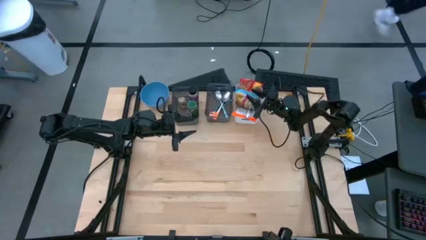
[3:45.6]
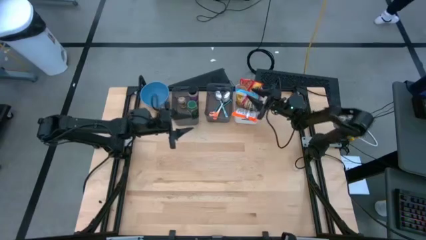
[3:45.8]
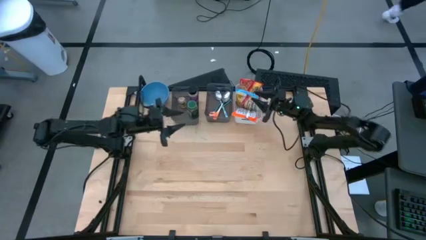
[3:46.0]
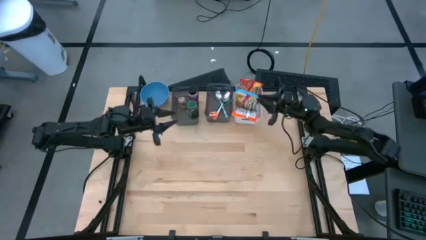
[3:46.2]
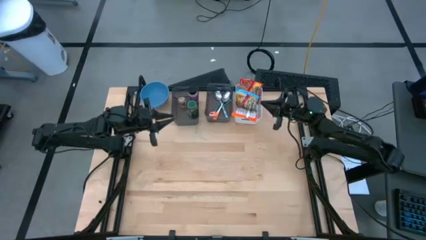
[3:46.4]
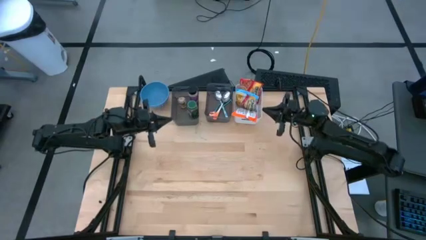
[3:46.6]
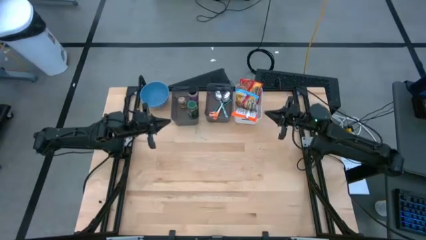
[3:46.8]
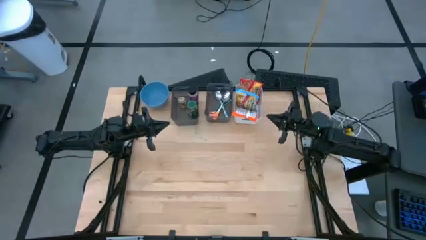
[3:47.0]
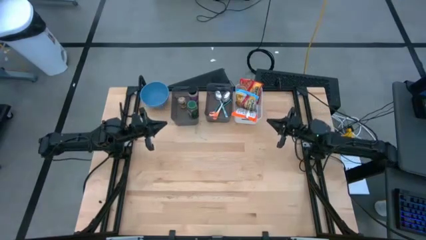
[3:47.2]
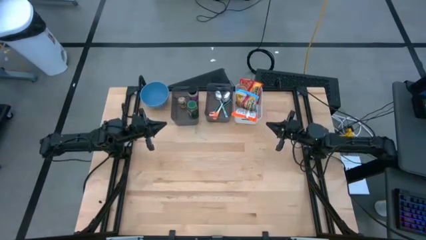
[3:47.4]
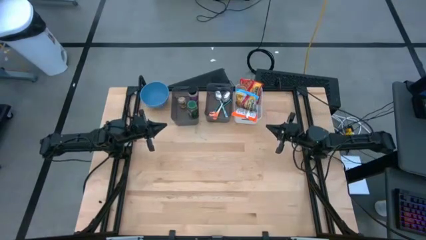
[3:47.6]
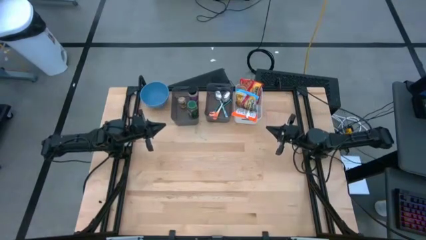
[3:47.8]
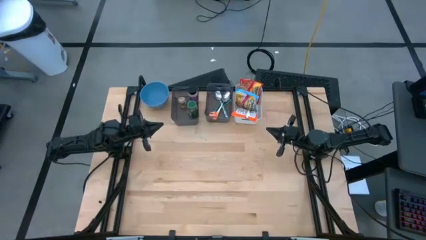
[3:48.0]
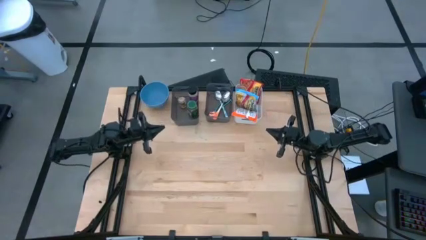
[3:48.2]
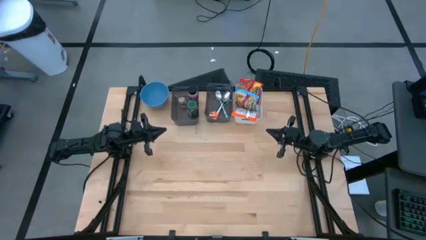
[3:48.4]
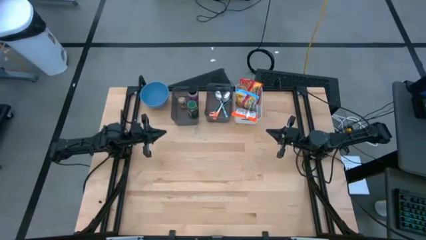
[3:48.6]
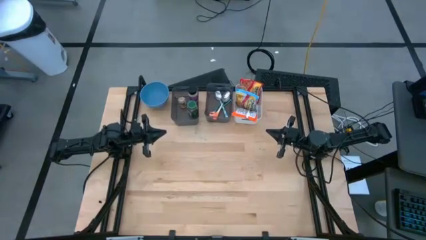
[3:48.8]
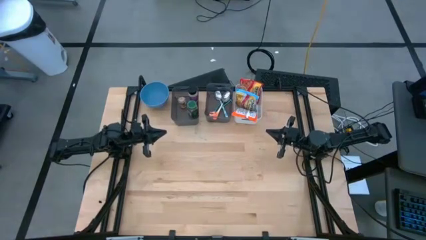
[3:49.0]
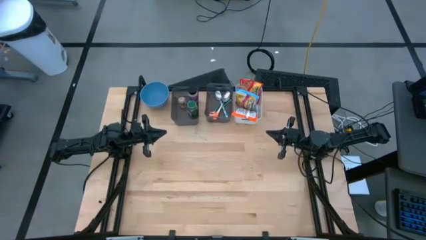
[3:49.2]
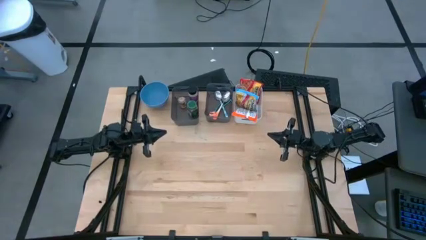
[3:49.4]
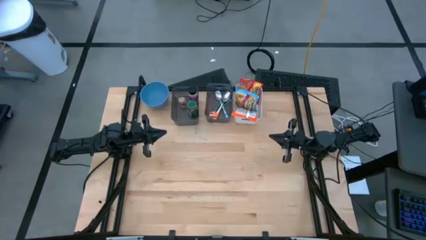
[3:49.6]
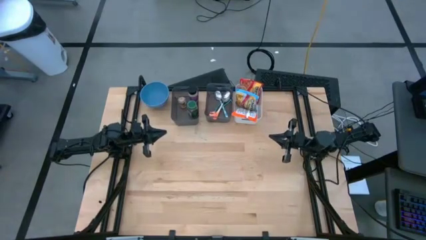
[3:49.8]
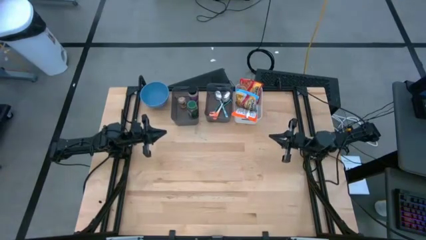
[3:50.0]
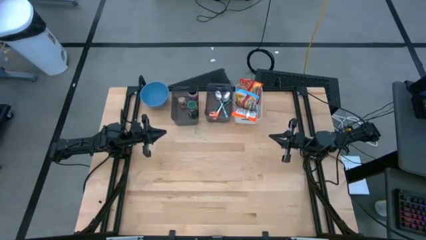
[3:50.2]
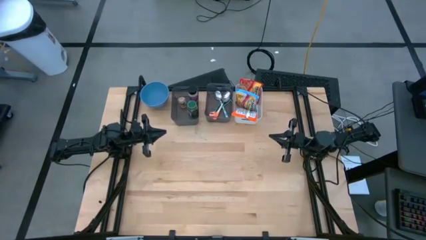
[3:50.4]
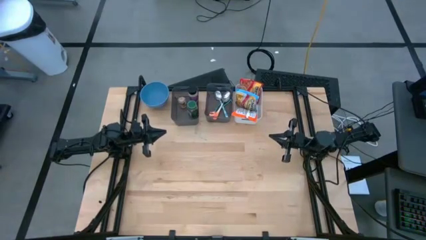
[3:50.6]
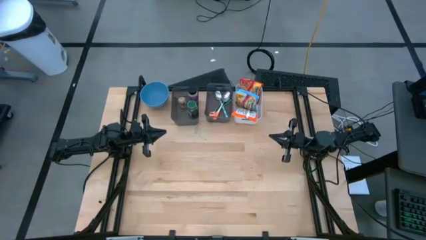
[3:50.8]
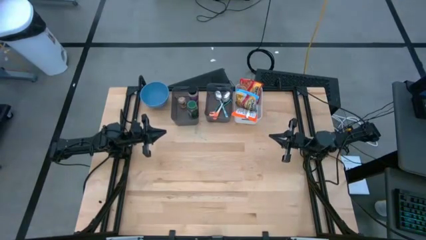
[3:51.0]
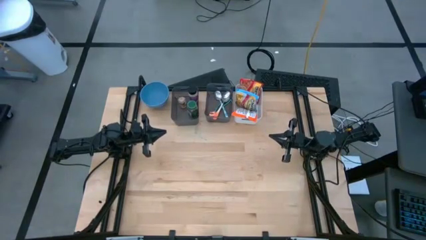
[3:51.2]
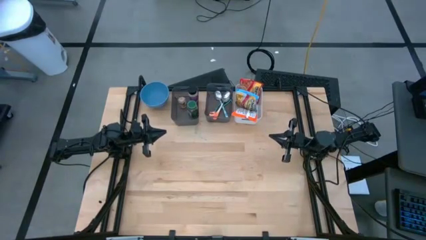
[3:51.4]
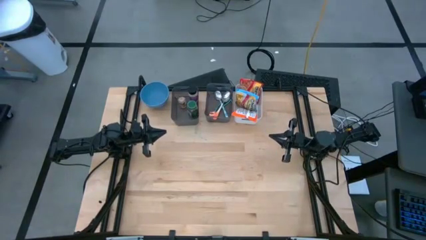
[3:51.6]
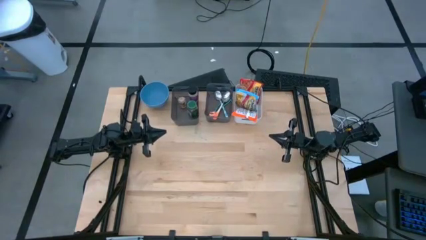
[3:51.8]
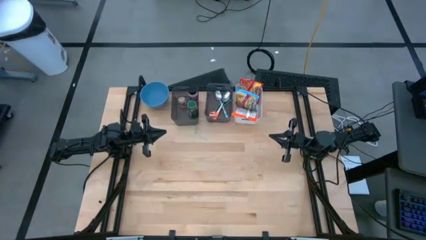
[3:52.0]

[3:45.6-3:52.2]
Task: Pick & Place Food Item
Return to Home Position

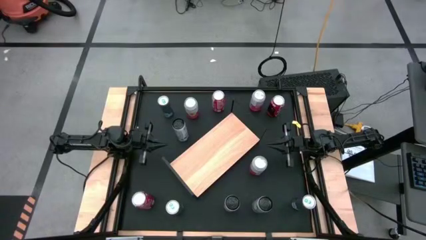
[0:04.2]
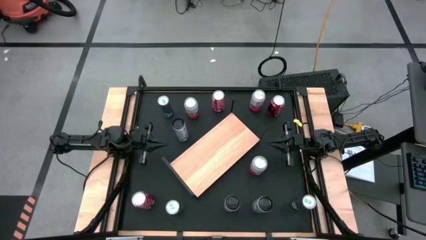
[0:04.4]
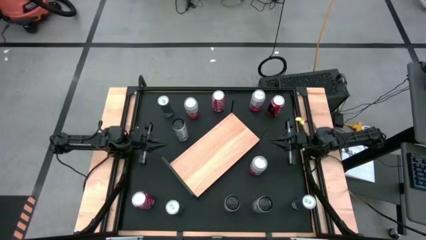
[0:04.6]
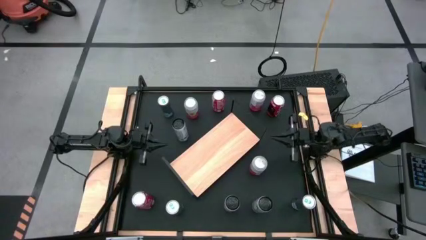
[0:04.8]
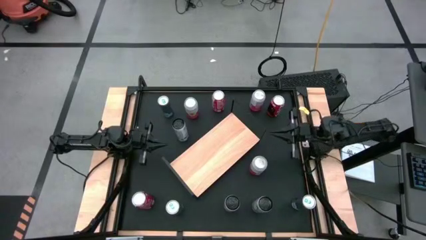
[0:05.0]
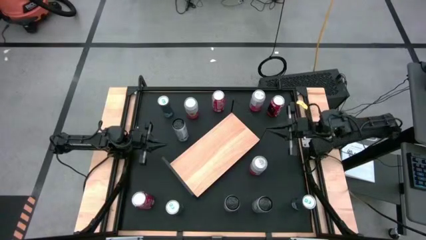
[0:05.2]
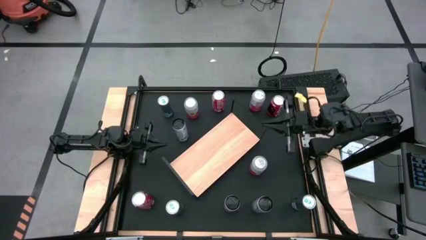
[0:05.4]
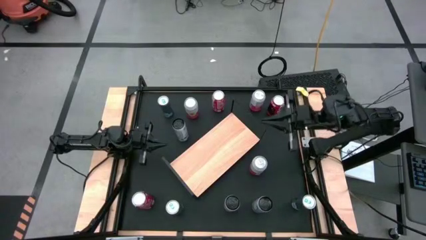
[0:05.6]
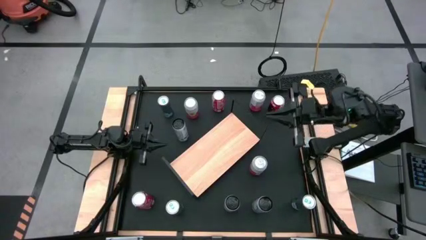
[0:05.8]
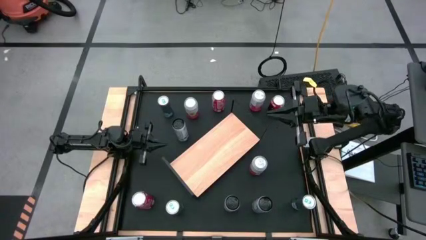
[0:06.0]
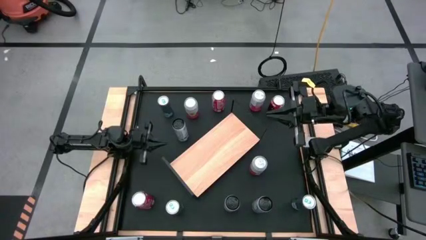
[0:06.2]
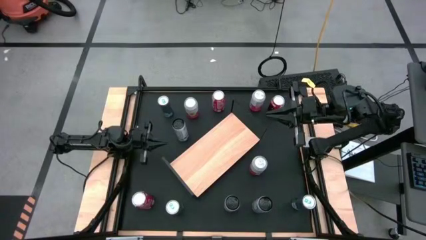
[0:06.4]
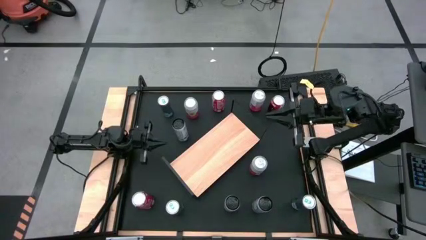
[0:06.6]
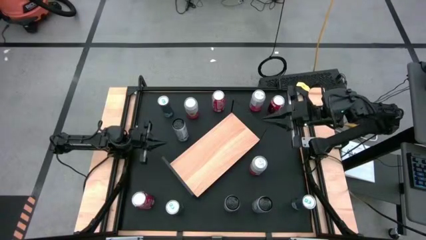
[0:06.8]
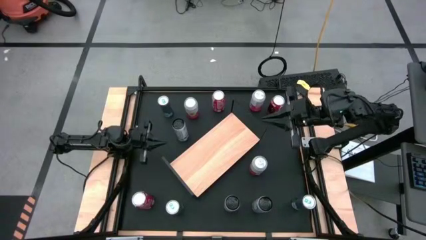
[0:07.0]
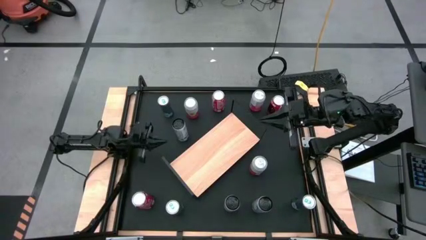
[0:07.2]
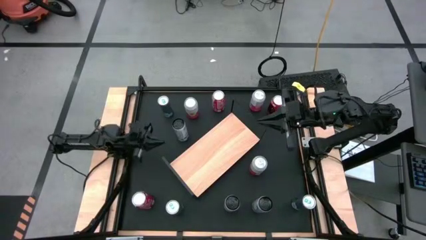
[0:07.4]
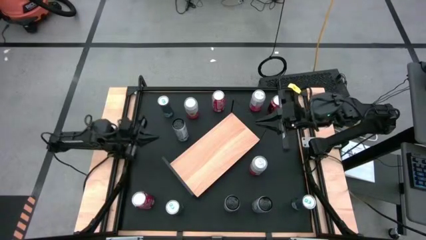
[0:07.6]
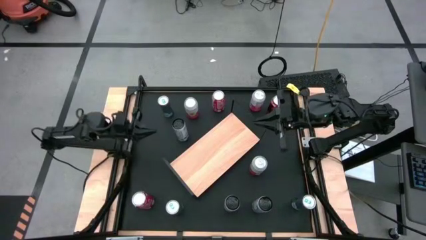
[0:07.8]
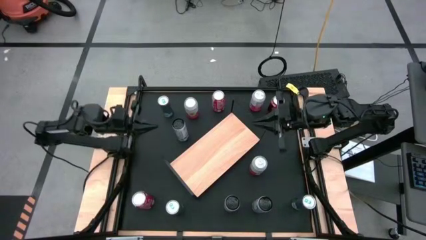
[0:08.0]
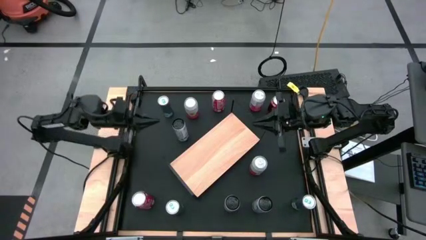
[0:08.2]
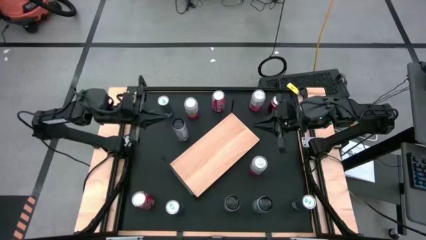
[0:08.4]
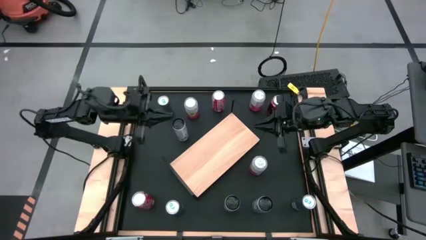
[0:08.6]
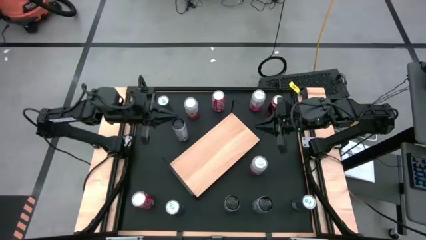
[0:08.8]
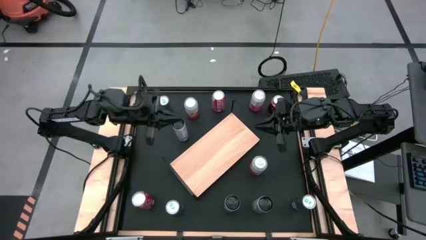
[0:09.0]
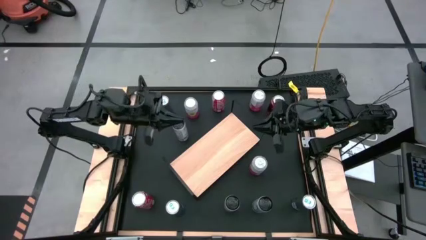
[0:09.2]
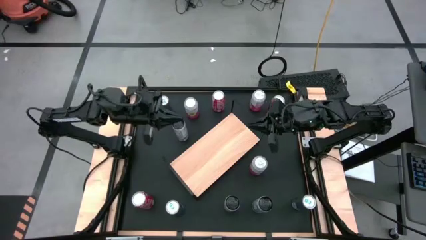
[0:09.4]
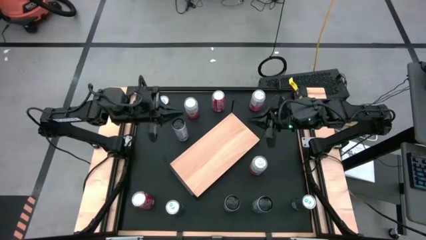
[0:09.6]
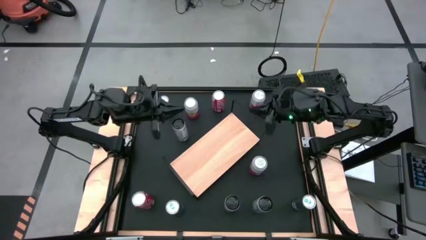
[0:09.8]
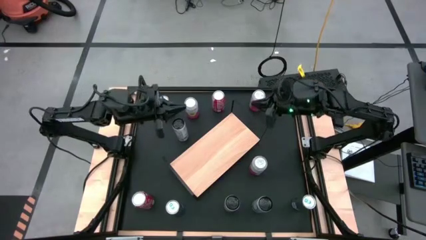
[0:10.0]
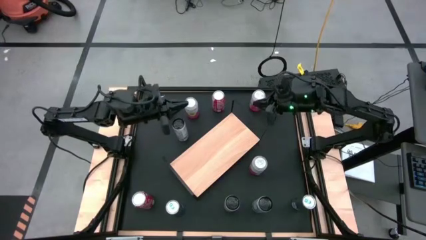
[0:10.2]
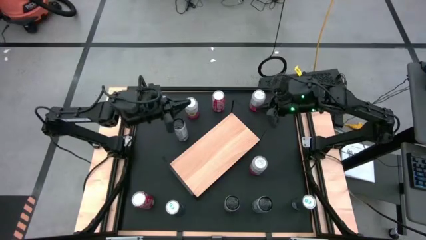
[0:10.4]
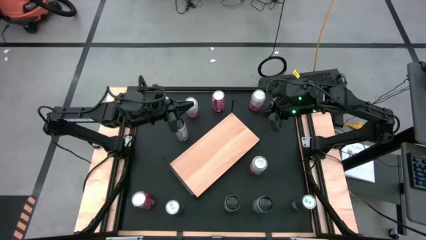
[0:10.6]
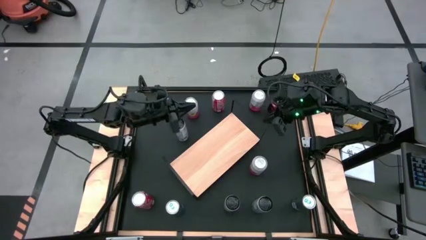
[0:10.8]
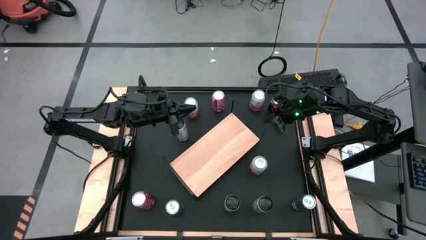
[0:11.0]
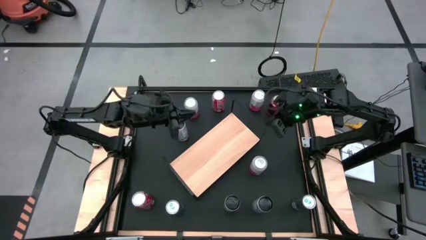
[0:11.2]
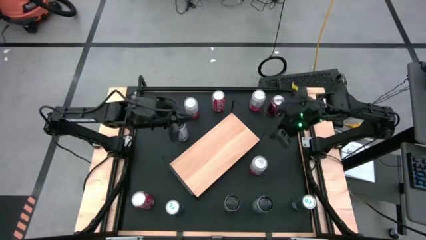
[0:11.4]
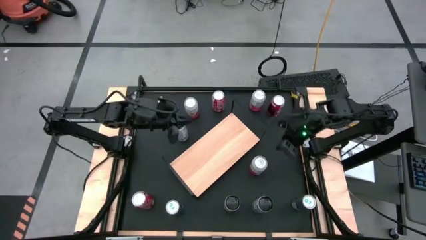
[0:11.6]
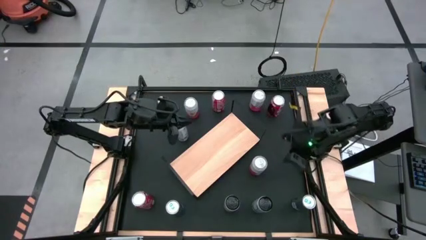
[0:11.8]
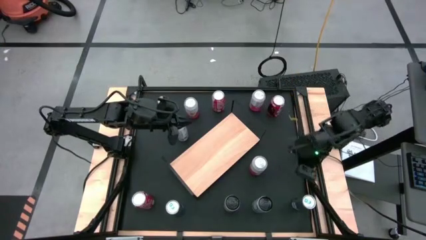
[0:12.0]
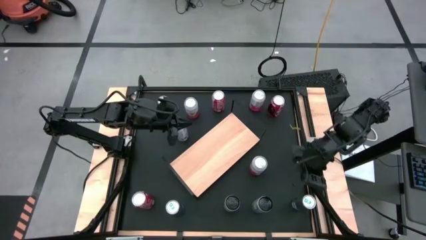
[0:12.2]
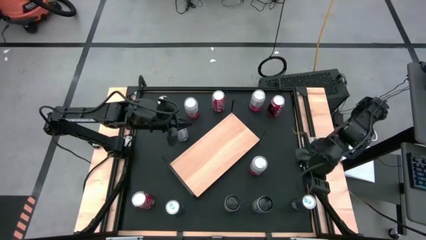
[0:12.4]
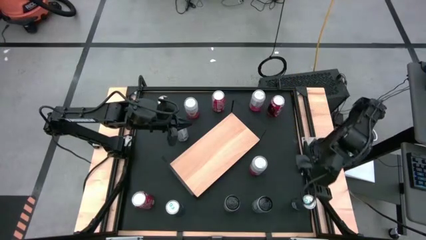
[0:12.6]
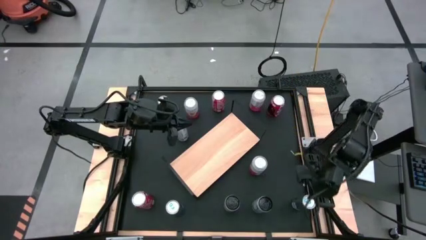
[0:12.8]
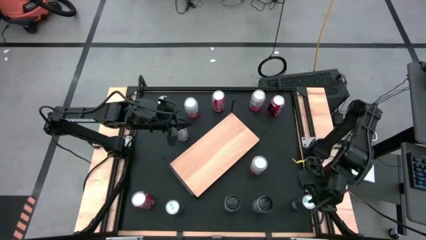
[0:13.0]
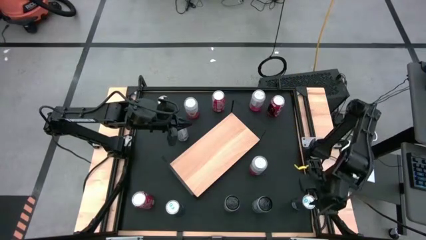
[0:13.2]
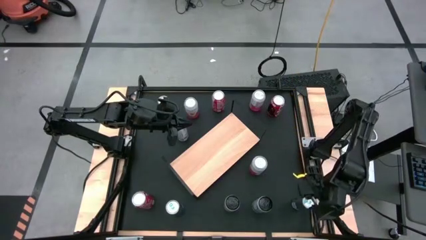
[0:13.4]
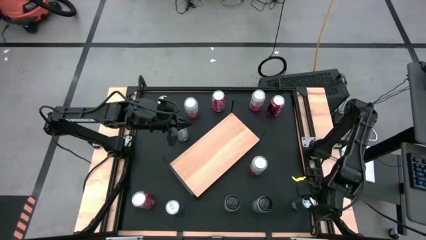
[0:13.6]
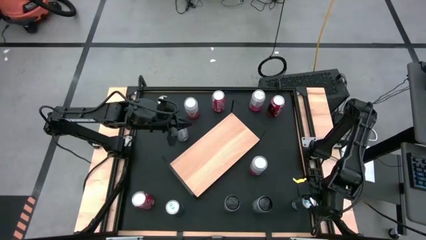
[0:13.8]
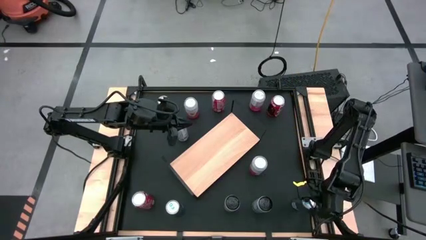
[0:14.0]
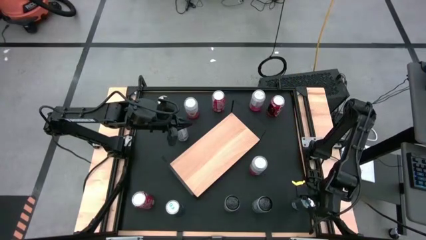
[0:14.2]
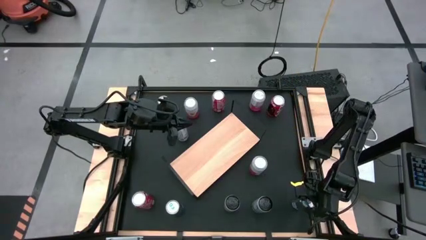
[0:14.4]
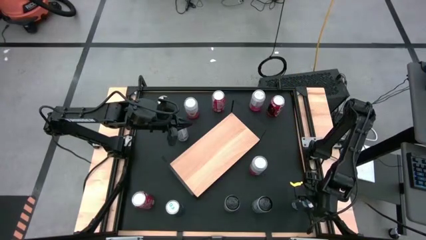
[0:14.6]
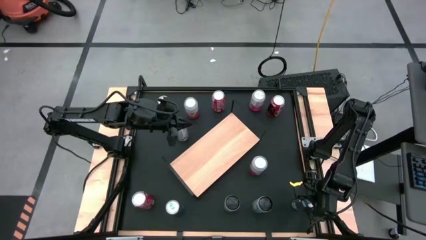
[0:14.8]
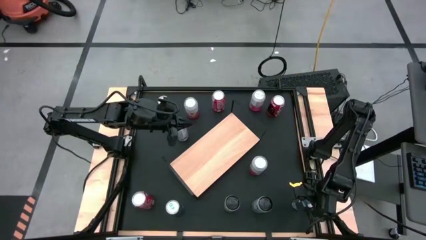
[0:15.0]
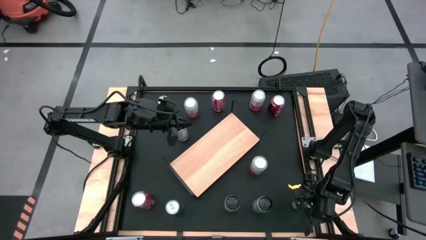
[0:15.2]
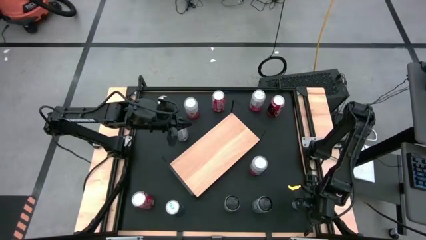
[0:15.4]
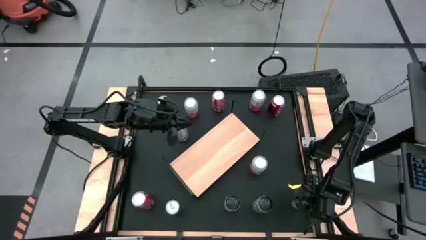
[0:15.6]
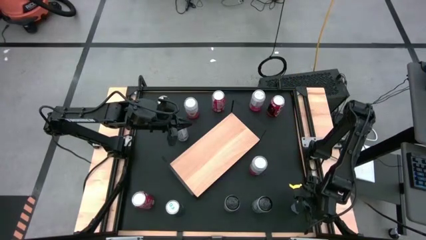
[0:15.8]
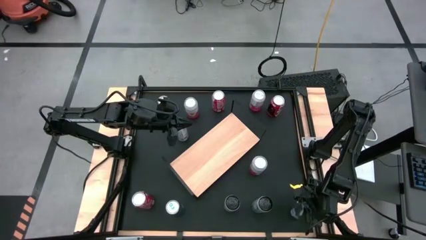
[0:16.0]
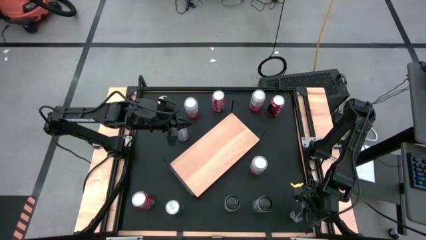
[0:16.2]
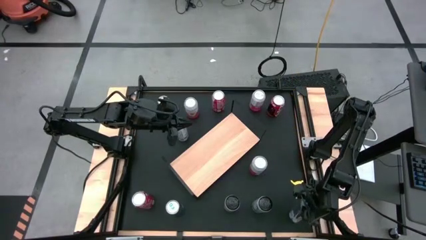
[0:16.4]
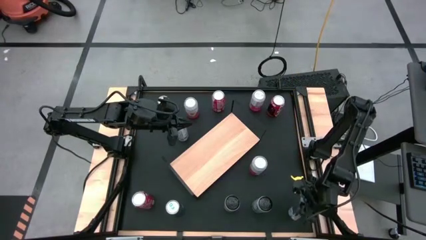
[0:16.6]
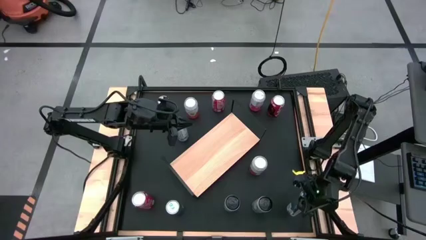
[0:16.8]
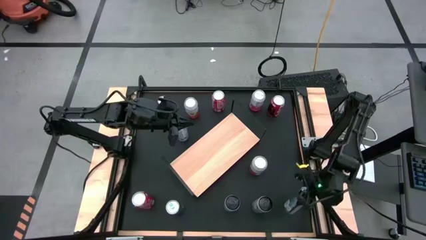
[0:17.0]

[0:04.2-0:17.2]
Task: Place canned beverage on shelf
Put the bottom right blue soda can on the shelf
